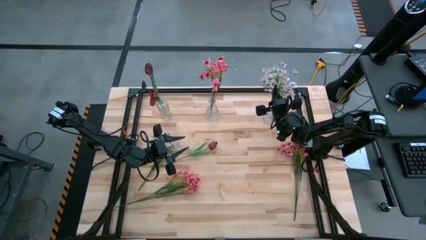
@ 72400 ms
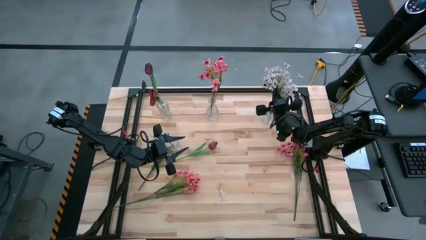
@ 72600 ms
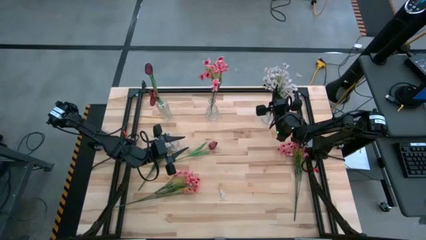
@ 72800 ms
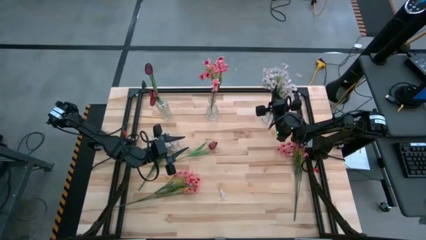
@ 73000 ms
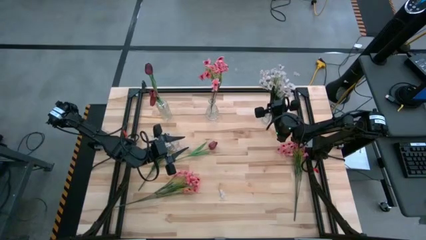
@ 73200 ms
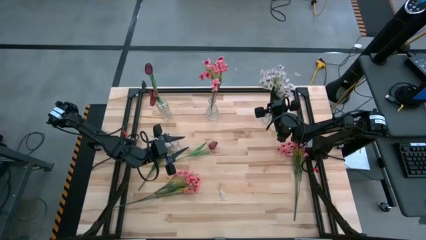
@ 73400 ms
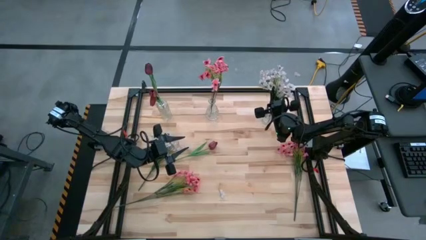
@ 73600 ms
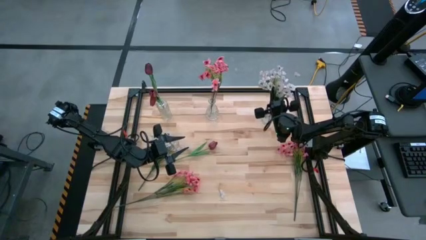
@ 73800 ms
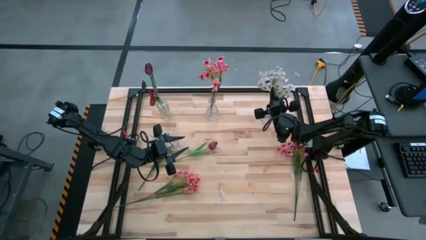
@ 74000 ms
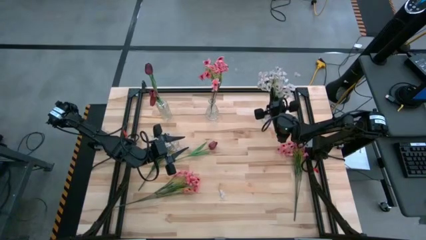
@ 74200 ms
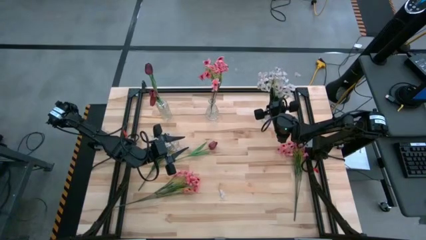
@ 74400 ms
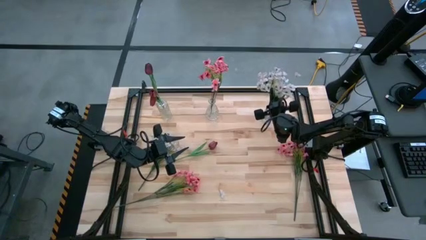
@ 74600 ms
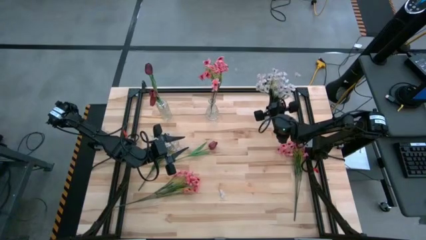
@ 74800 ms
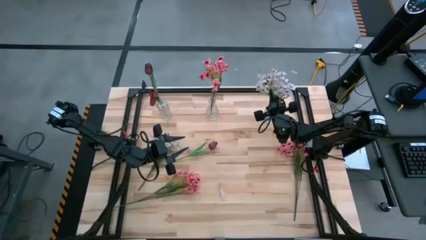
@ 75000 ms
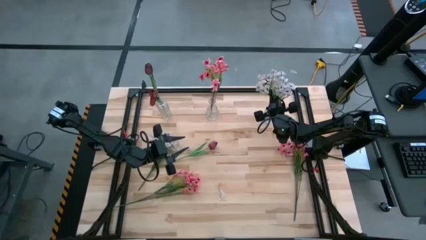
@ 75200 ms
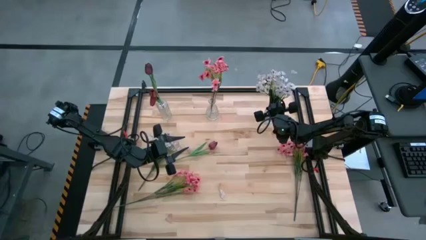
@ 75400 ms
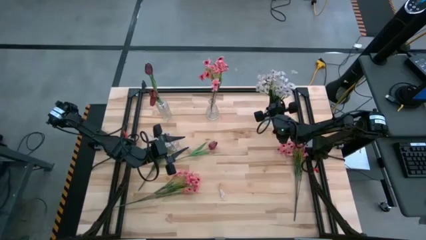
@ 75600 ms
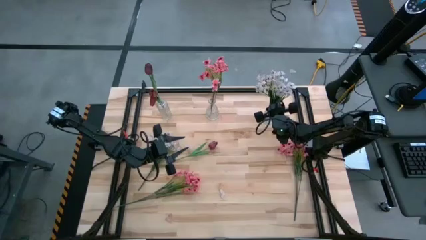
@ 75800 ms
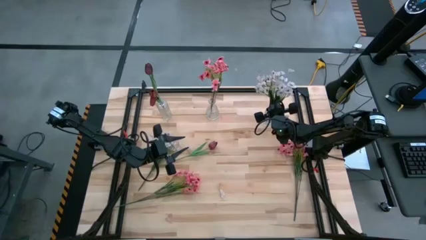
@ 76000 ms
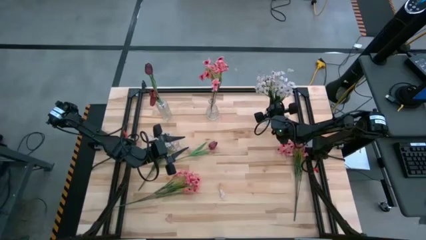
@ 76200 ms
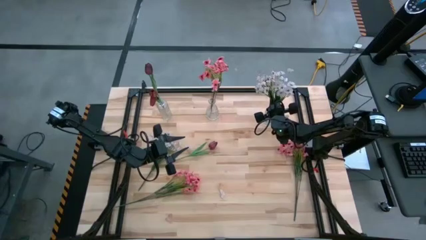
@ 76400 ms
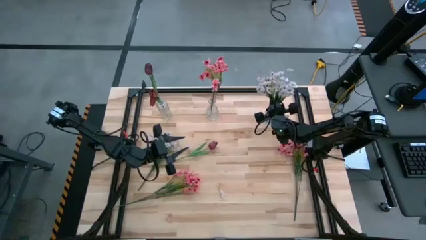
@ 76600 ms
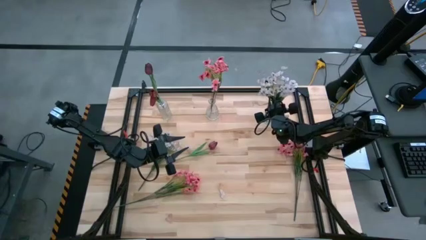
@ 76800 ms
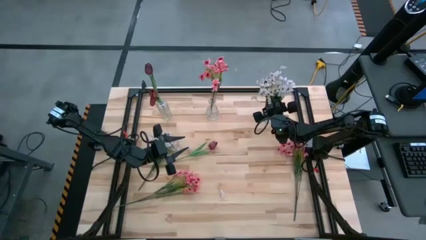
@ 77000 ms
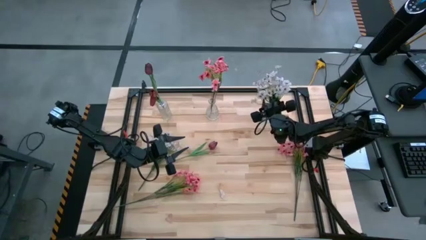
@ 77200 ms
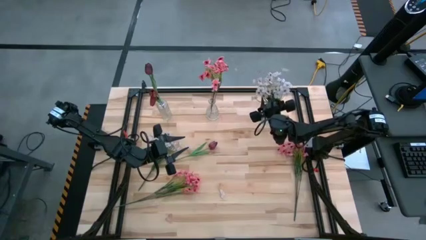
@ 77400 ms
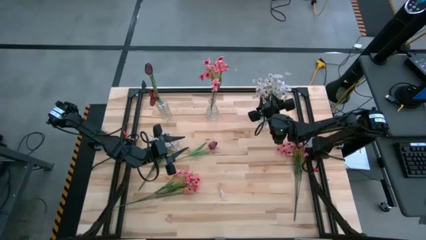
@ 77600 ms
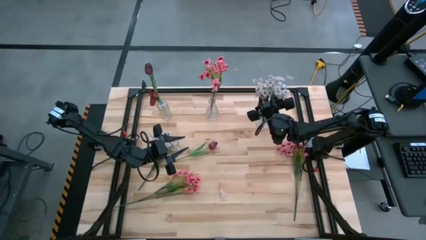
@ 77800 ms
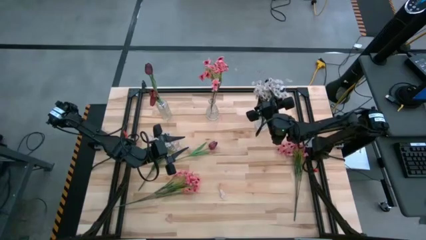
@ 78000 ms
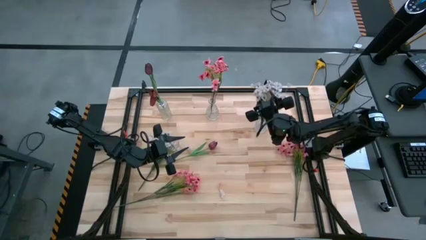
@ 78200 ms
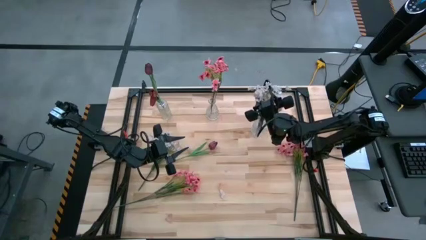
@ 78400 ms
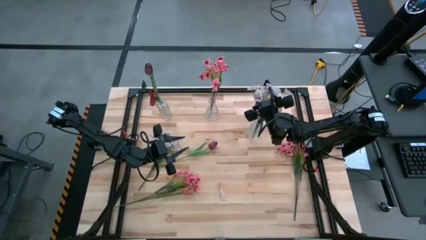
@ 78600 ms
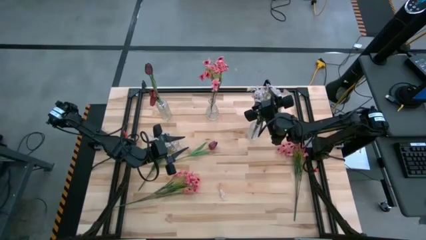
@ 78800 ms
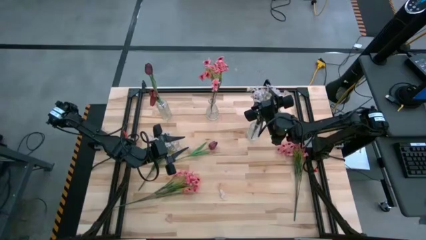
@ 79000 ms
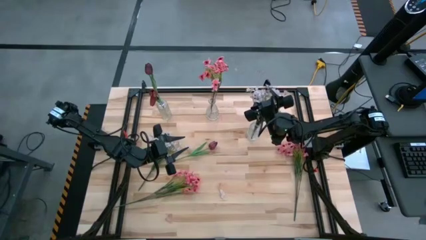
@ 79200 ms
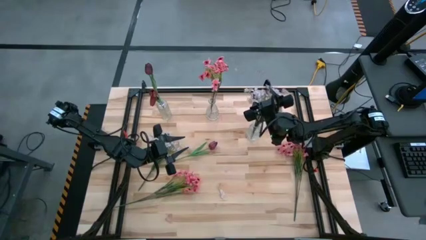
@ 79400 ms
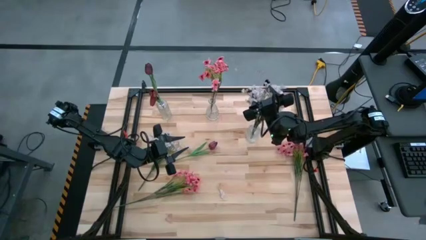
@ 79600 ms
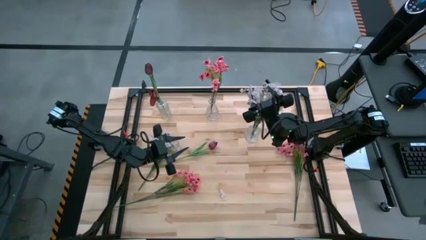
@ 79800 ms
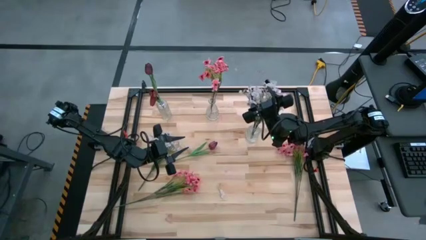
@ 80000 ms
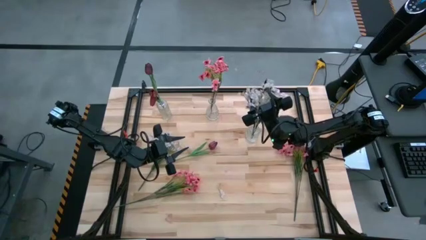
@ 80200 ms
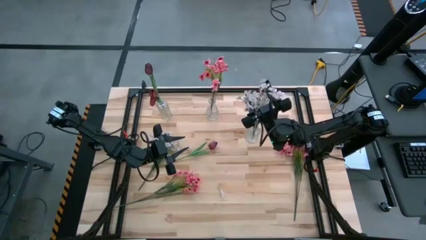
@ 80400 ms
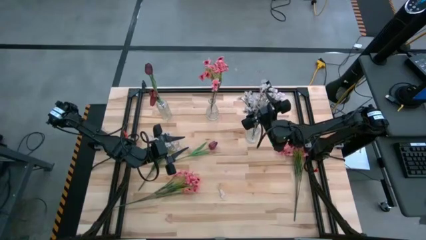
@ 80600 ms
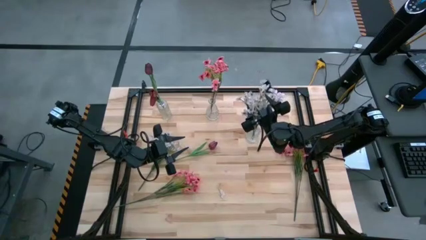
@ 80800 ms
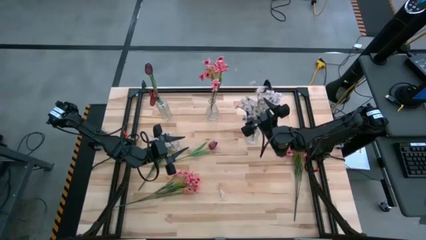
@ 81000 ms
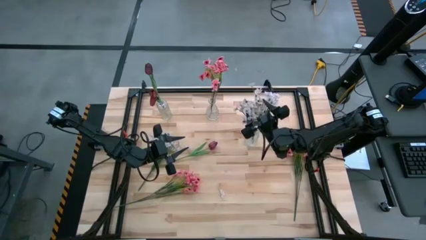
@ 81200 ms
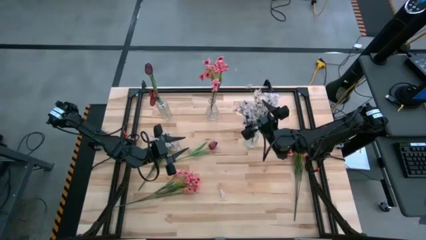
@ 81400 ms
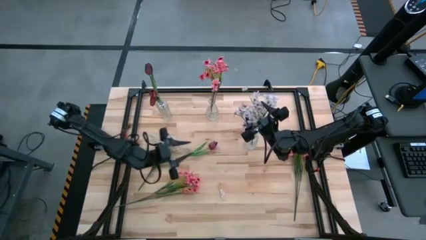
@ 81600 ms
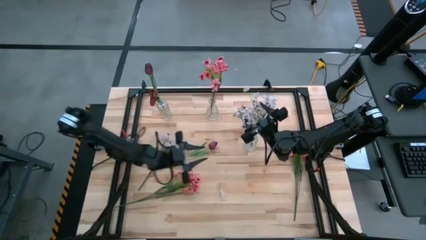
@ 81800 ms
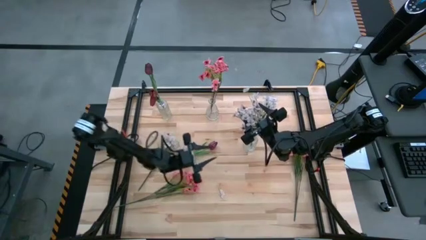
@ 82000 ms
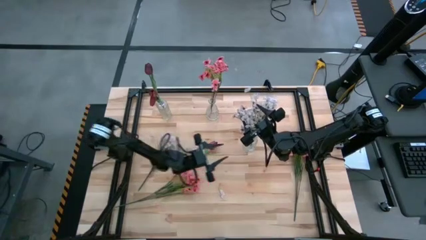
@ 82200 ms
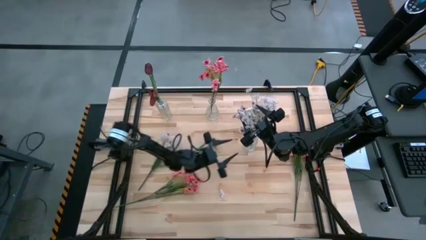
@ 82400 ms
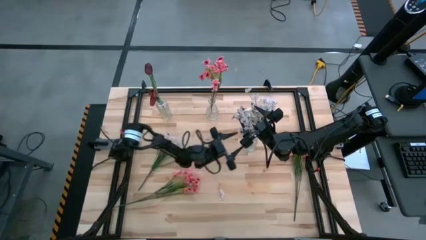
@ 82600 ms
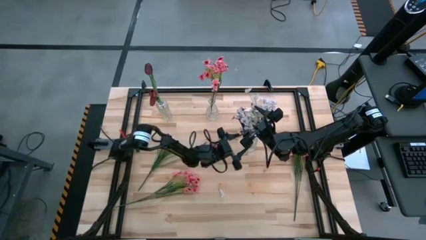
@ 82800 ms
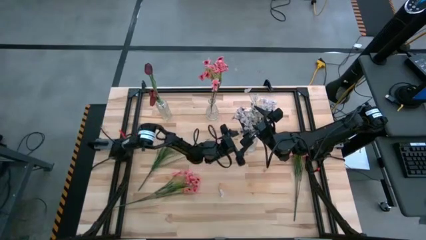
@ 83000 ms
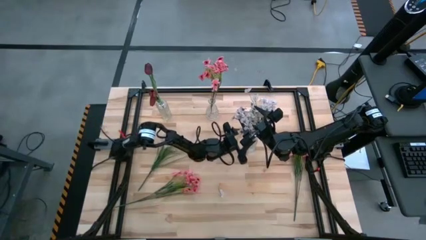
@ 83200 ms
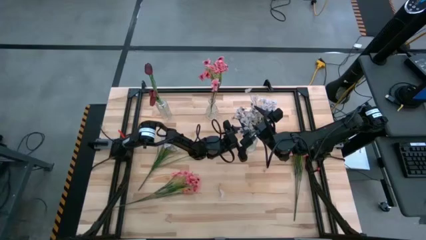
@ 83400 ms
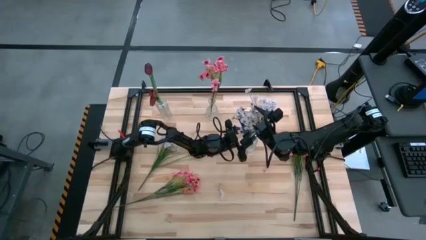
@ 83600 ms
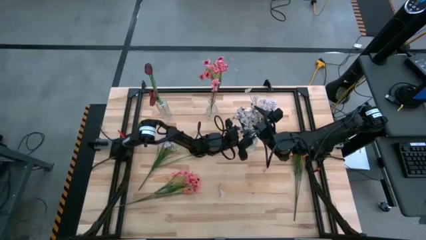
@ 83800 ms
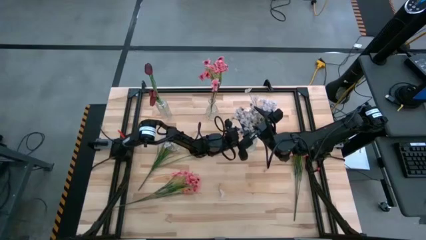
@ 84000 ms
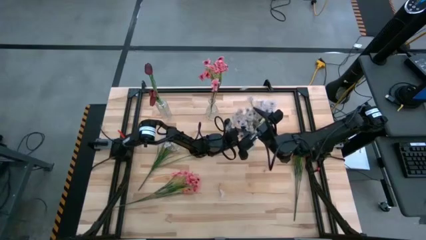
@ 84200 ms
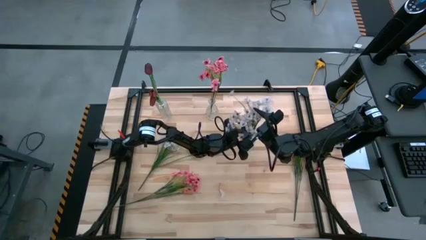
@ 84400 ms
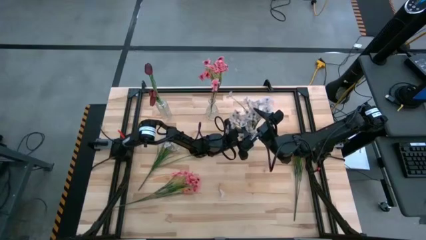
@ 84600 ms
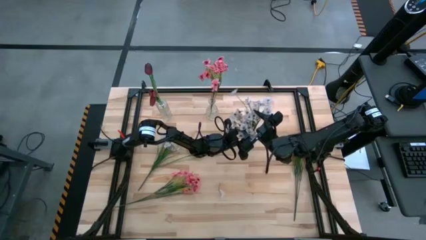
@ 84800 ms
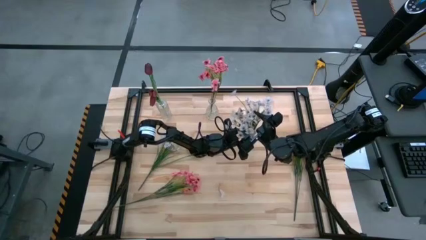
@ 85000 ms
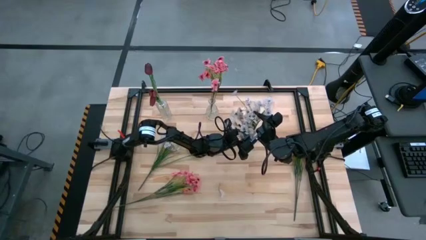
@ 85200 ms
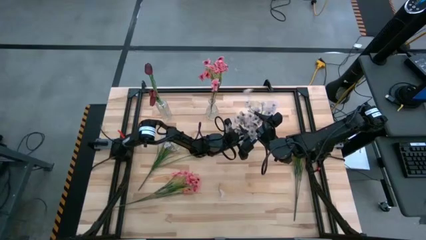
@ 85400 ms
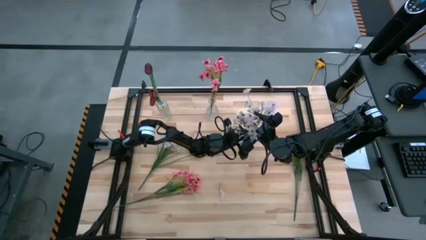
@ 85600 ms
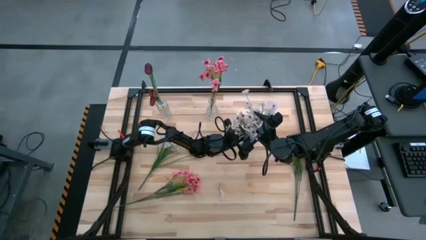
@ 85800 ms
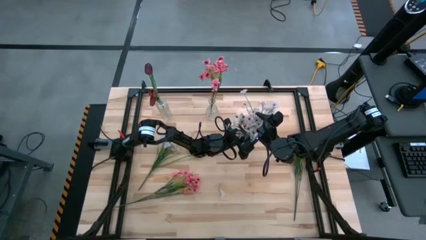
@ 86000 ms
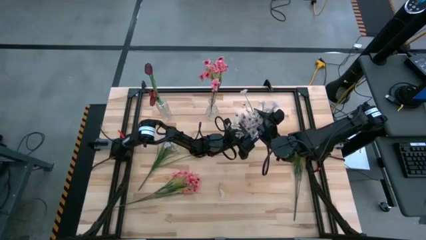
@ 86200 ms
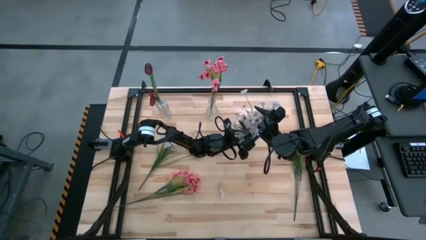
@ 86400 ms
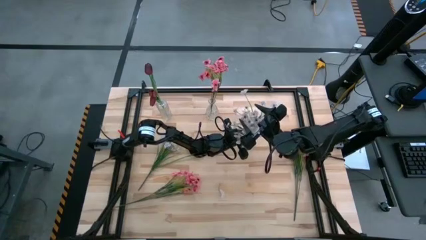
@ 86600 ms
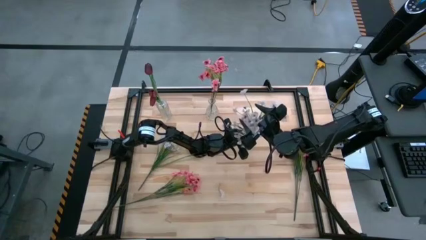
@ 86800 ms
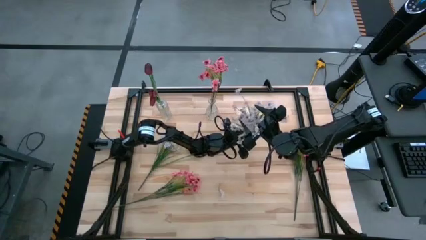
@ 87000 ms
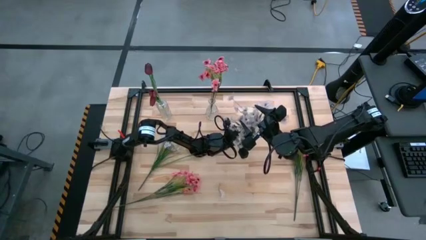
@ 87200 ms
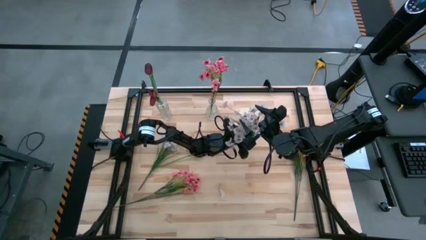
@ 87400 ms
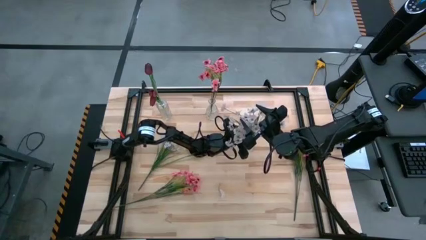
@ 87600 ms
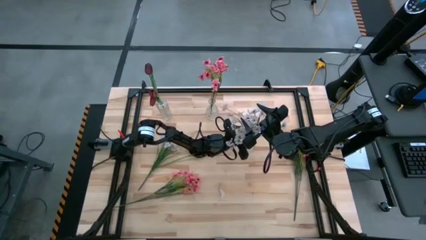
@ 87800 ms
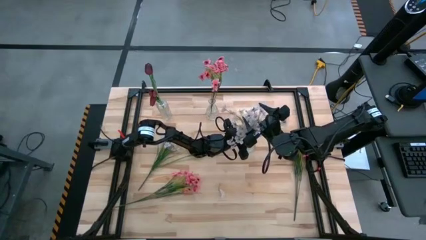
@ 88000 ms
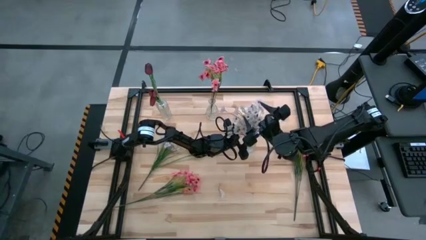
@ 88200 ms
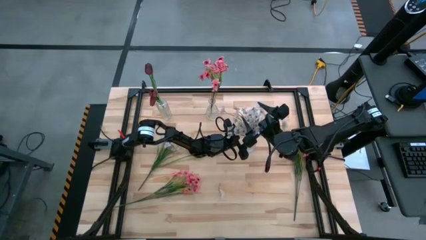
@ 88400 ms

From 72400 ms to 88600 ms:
Task: Sort flowers into vase by color
Put the right white flowers into the right transparent vase
